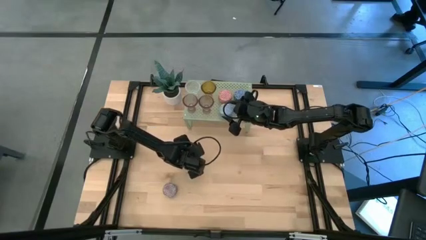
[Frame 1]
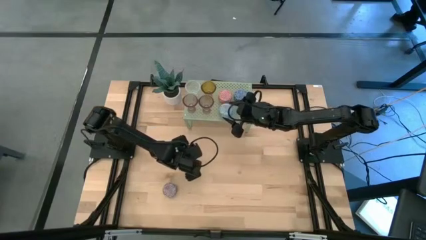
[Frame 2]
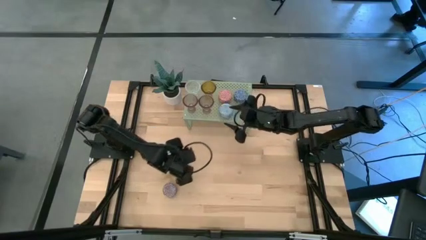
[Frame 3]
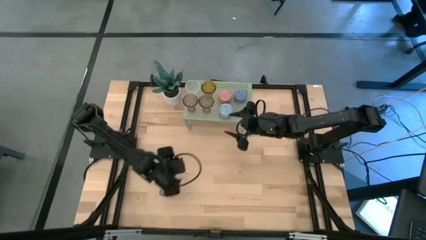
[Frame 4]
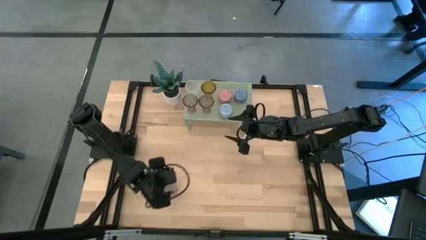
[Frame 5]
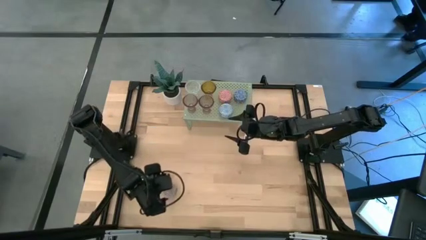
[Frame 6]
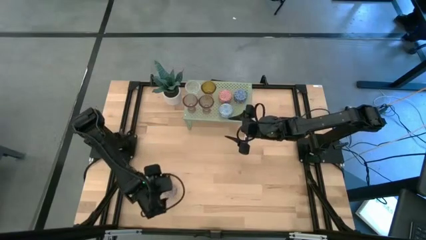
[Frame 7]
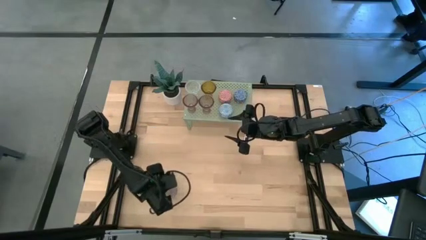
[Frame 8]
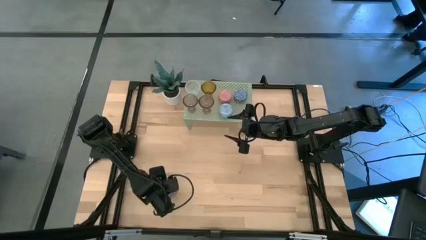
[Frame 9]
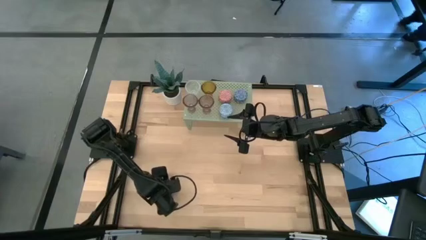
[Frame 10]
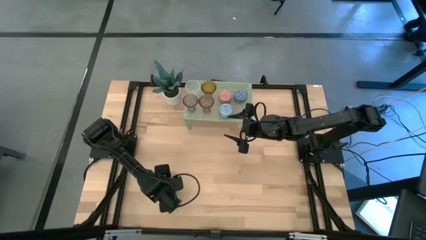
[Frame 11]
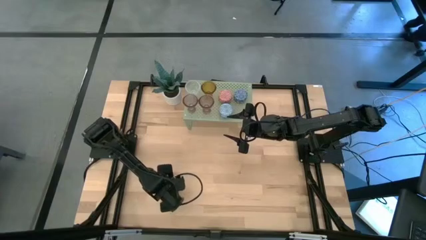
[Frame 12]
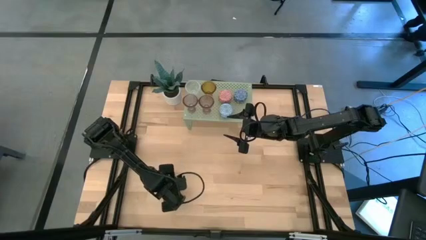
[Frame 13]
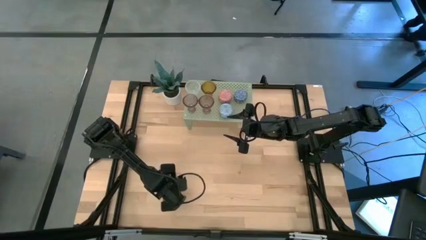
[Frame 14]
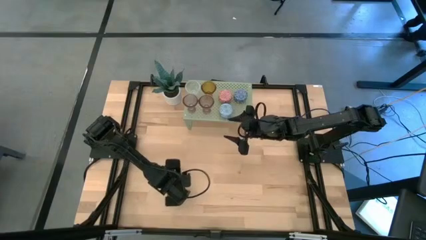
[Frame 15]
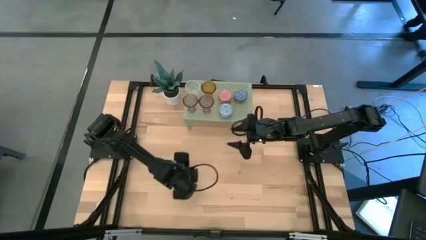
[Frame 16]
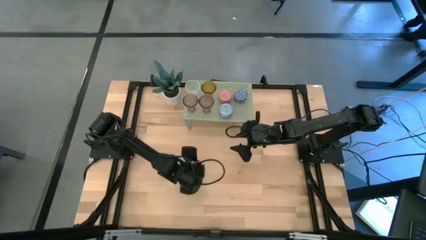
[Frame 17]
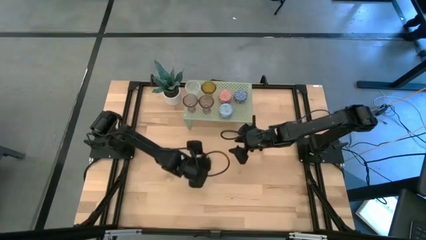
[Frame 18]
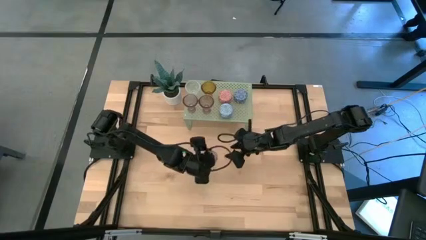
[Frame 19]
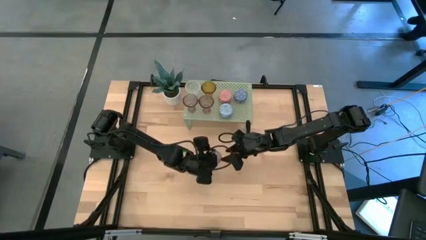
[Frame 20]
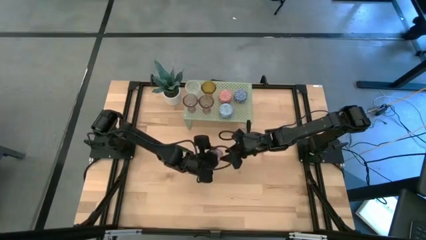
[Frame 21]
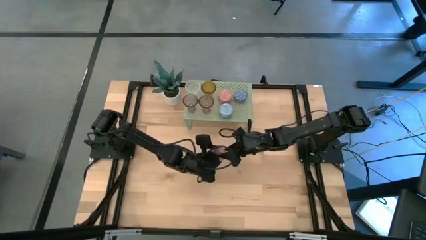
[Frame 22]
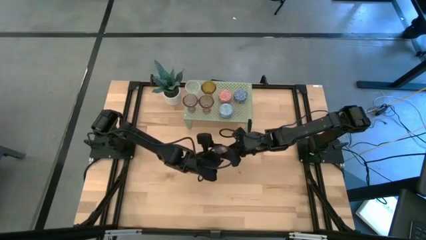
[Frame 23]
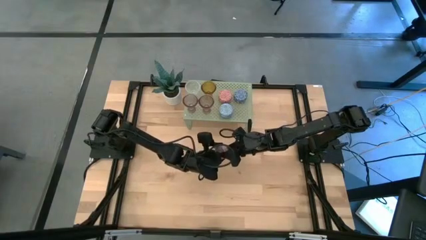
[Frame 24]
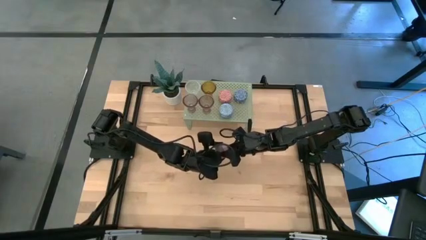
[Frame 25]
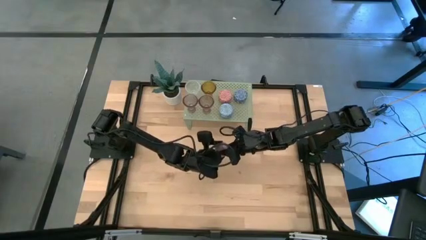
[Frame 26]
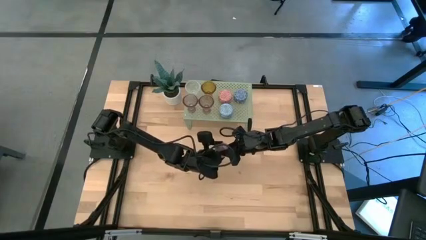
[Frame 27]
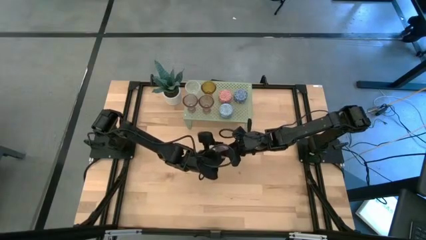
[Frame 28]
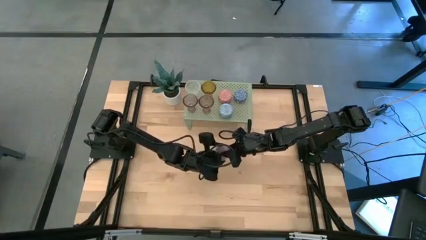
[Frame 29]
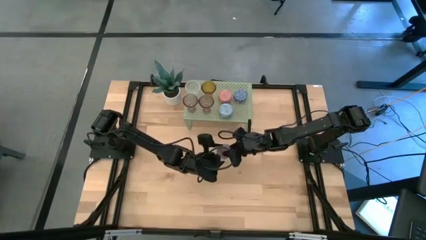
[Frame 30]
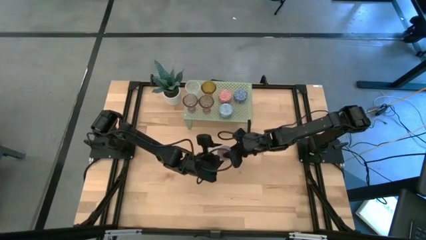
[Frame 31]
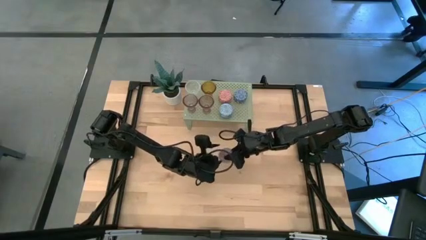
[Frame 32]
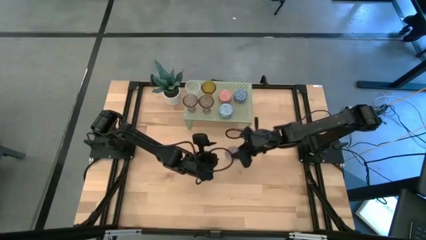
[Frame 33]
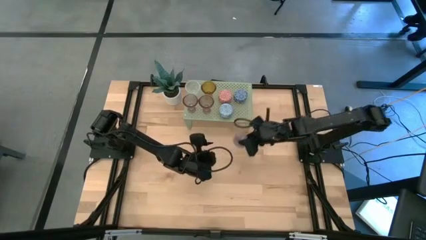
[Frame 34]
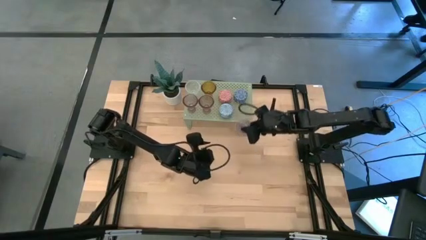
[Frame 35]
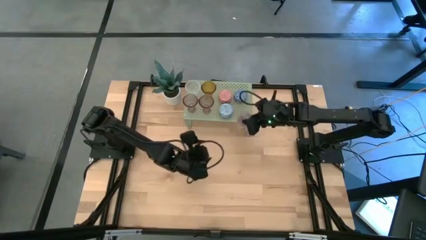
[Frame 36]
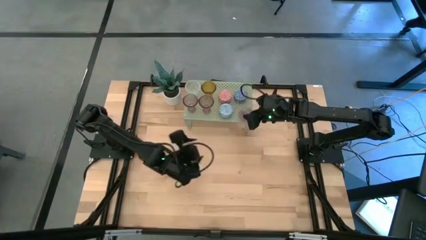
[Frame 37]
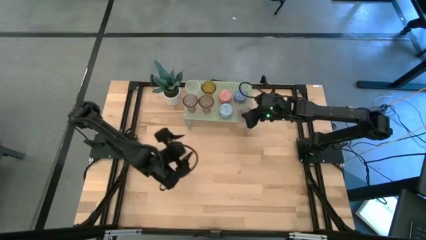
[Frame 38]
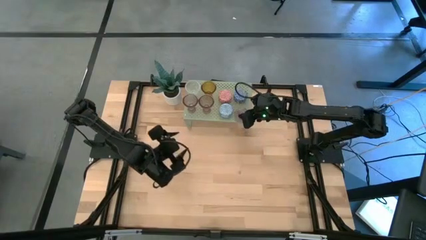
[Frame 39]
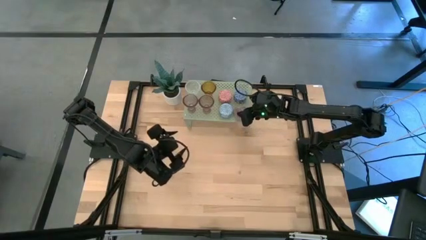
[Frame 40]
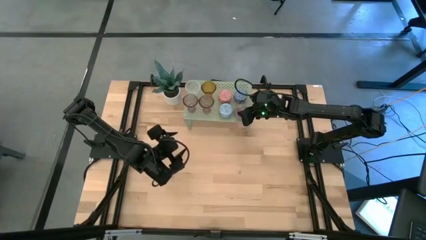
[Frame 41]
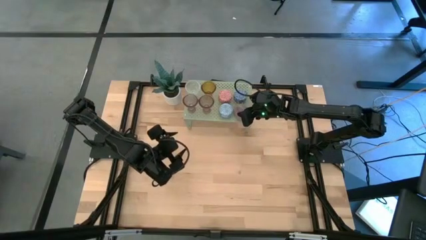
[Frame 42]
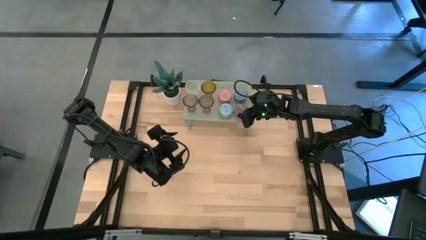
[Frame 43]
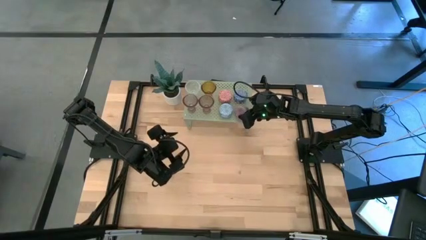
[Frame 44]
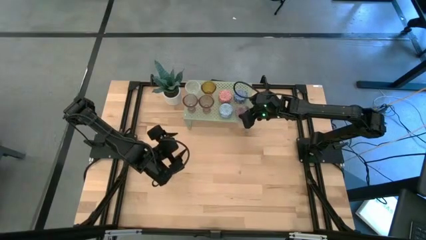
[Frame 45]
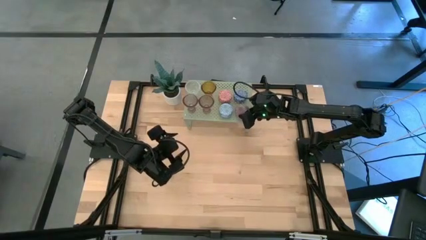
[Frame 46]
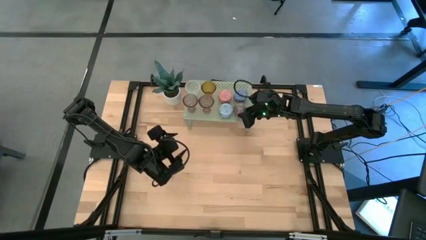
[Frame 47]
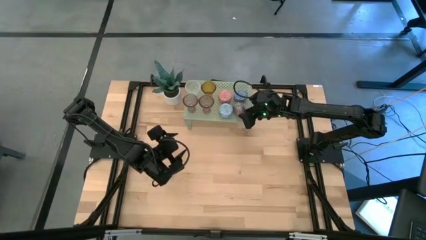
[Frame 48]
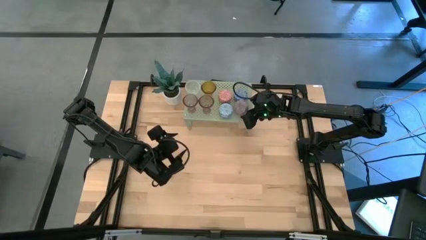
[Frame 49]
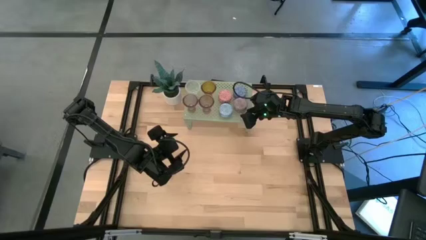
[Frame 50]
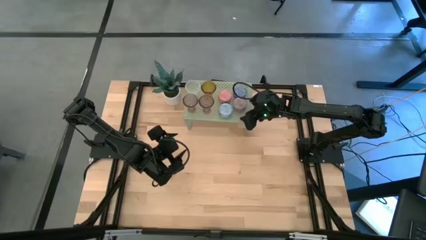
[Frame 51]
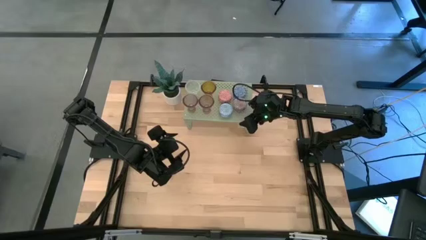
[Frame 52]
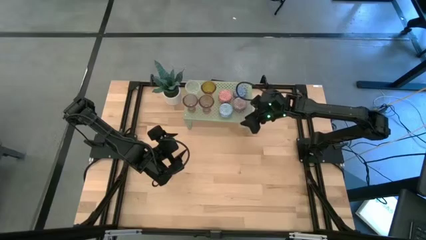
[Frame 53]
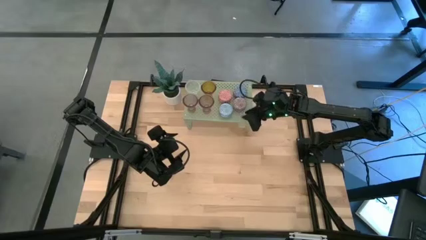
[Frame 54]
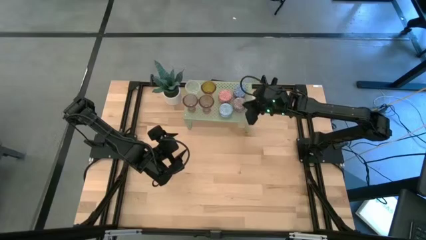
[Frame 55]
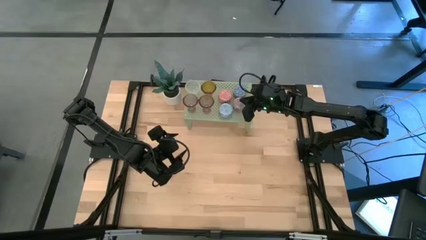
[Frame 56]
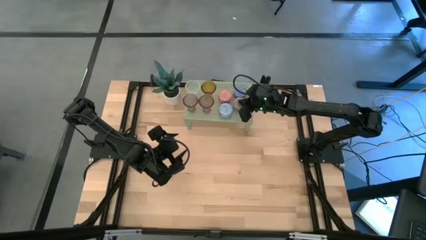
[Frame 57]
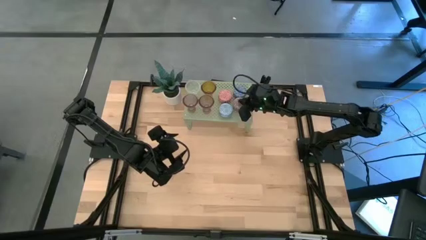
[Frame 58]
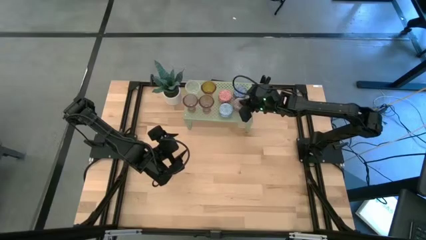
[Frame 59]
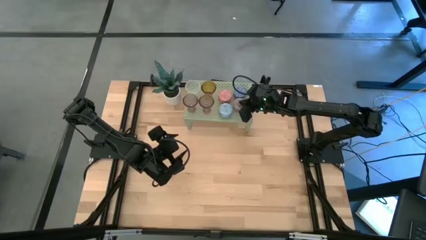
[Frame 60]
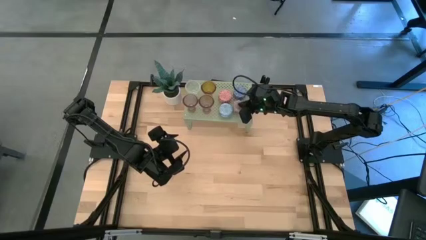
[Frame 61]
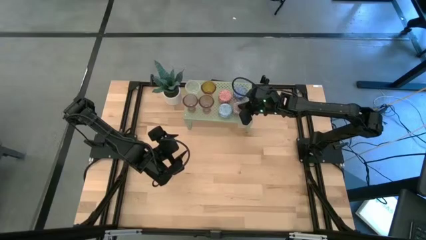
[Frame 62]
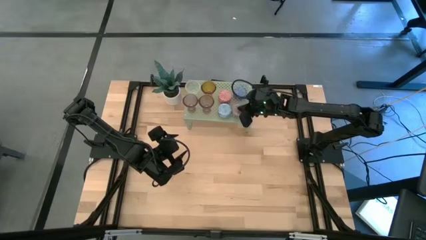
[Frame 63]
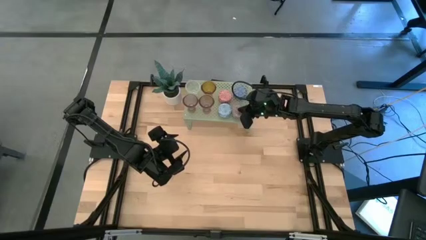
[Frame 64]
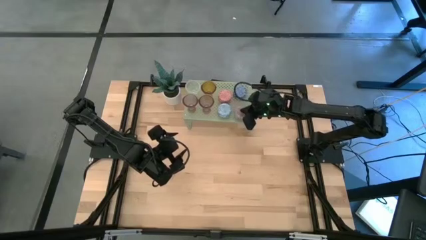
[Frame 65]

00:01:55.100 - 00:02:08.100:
Task: Pick & Place candle stick holders
Put the red scented candle on the shelf

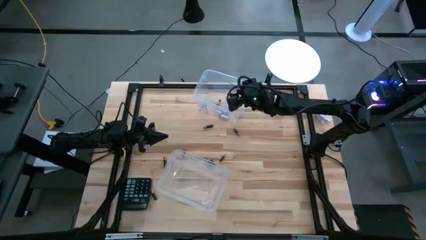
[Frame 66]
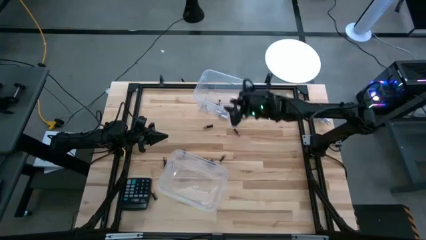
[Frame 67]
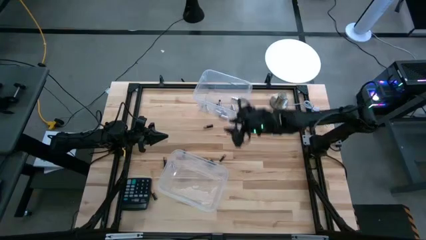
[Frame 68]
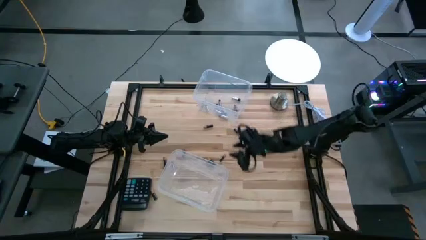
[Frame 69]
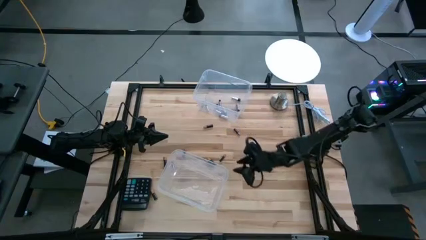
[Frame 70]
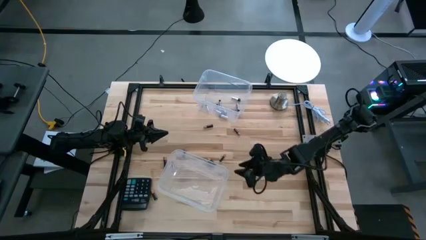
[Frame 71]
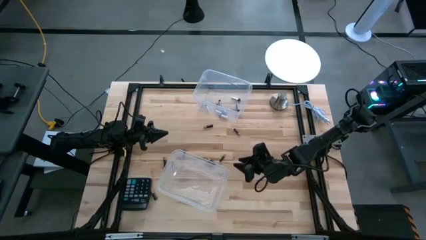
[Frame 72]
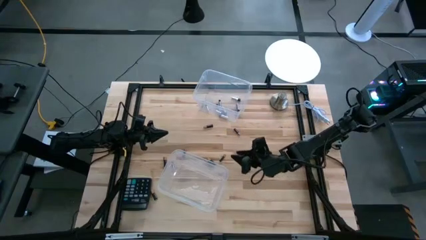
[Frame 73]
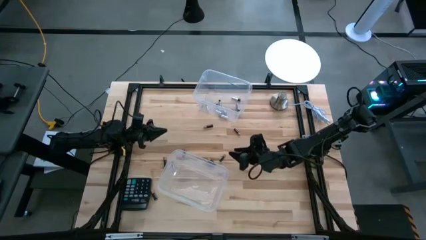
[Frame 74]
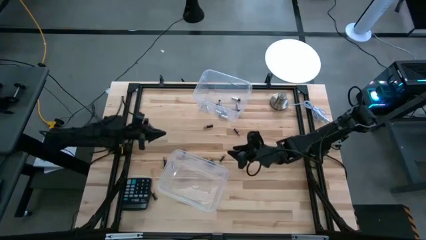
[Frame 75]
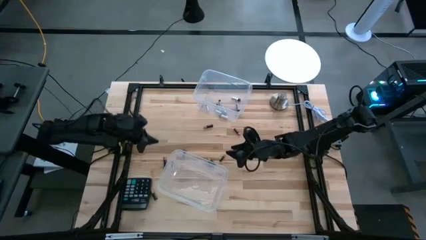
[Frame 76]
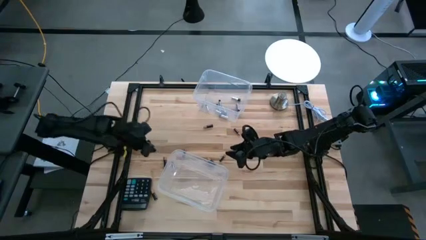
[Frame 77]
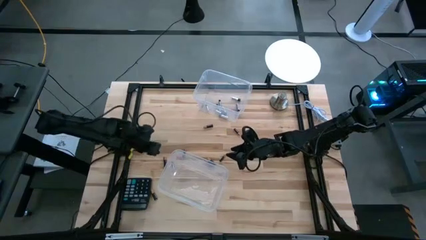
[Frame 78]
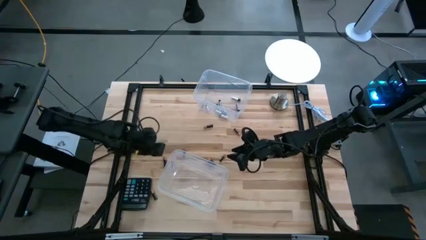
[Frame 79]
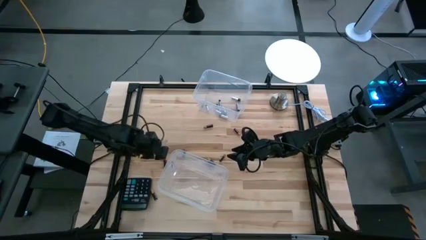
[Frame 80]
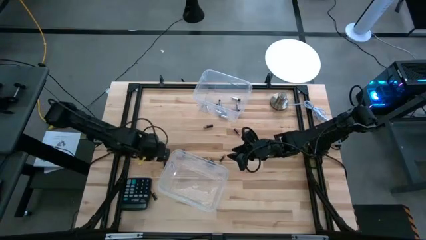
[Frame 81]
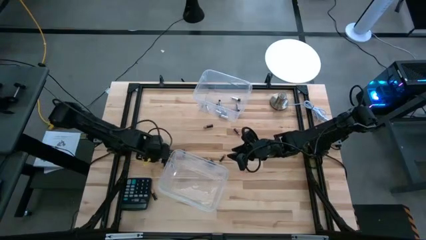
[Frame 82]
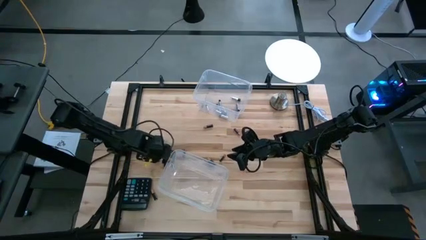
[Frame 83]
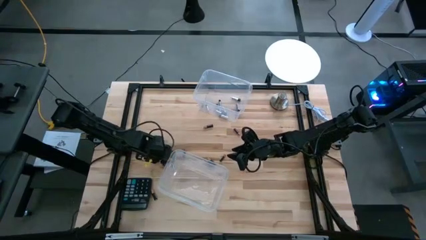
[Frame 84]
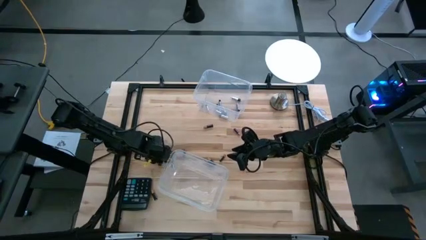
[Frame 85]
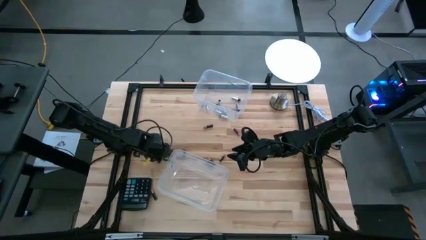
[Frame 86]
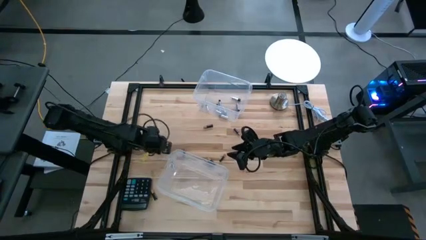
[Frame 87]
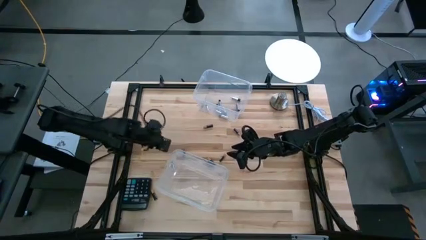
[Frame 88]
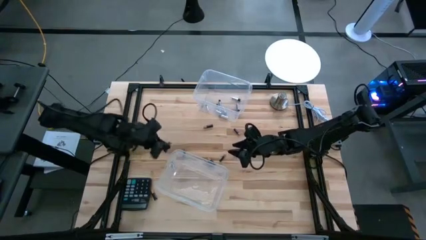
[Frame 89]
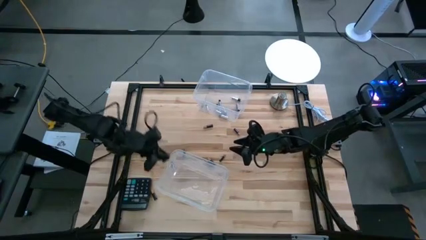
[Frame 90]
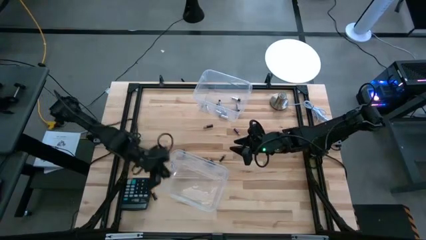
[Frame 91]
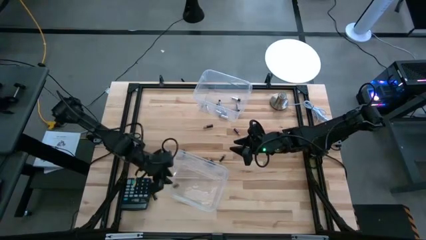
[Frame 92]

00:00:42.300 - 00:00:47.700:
Task: Sort batteries
Put the black battery into the bottom transparent bin
